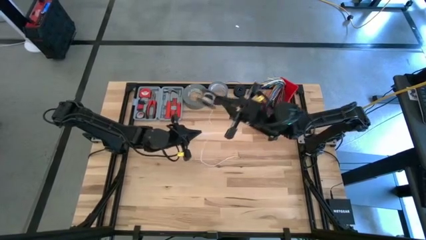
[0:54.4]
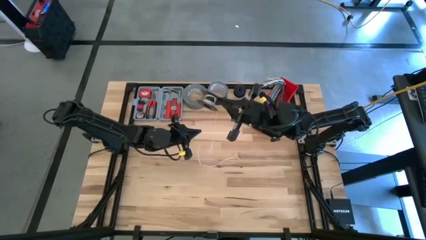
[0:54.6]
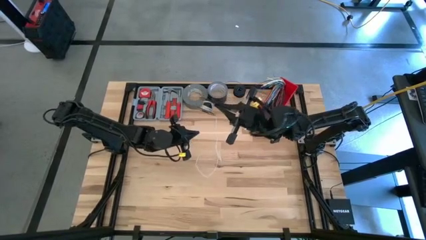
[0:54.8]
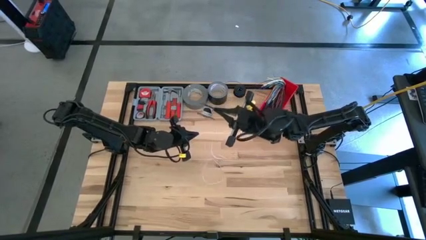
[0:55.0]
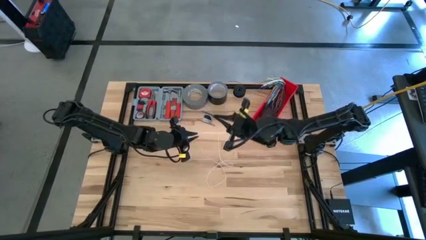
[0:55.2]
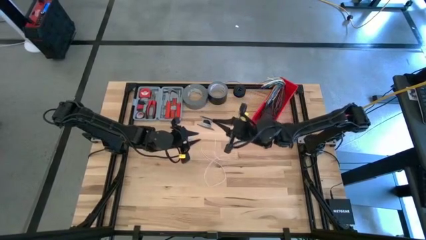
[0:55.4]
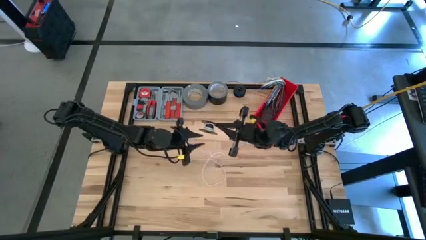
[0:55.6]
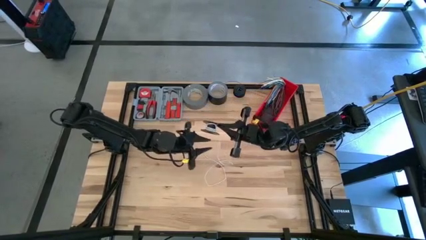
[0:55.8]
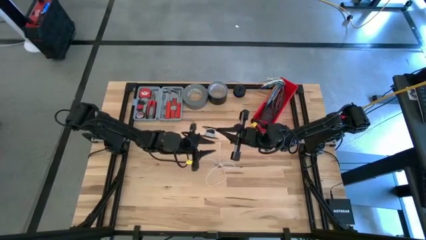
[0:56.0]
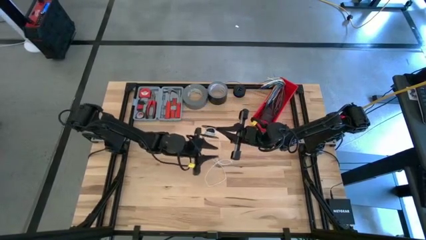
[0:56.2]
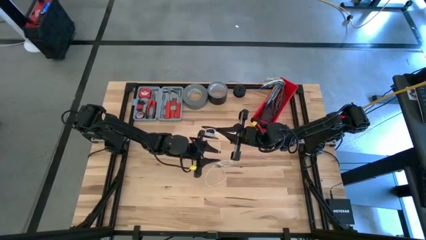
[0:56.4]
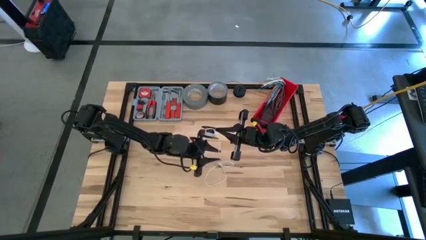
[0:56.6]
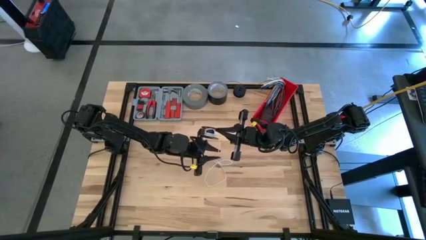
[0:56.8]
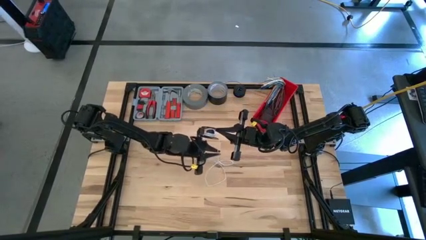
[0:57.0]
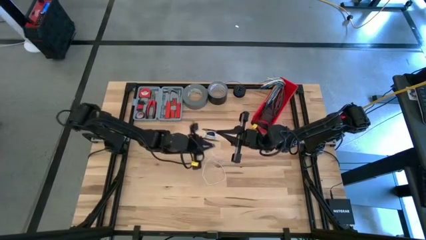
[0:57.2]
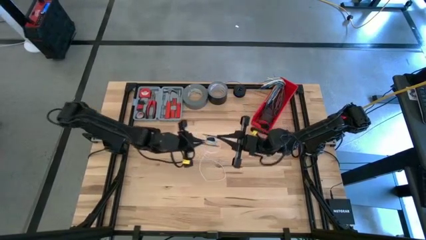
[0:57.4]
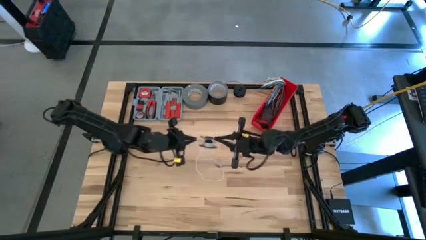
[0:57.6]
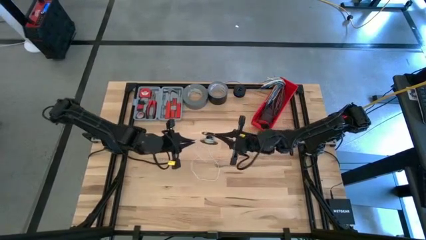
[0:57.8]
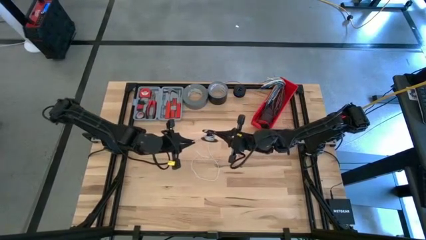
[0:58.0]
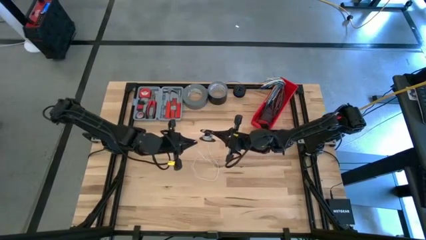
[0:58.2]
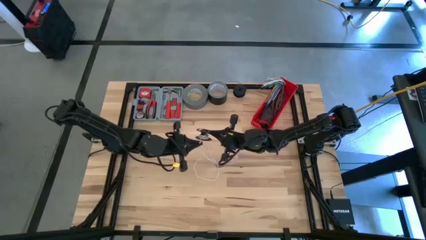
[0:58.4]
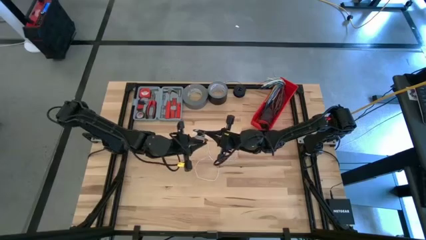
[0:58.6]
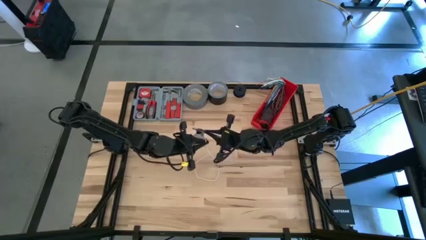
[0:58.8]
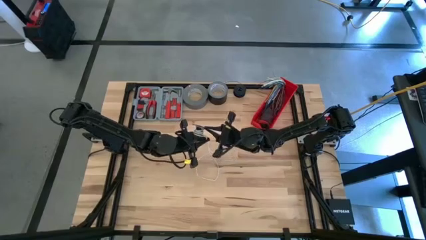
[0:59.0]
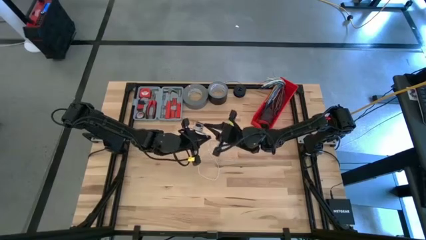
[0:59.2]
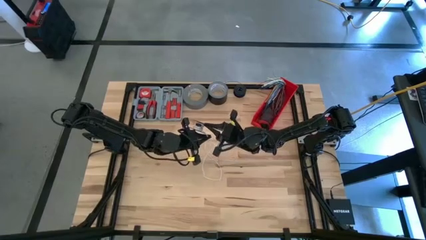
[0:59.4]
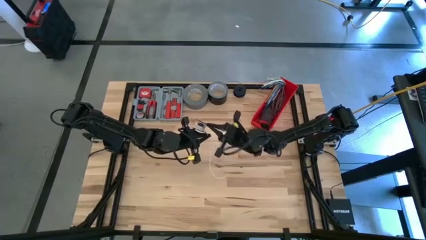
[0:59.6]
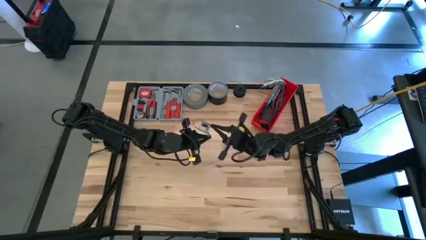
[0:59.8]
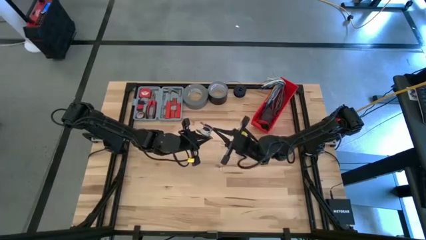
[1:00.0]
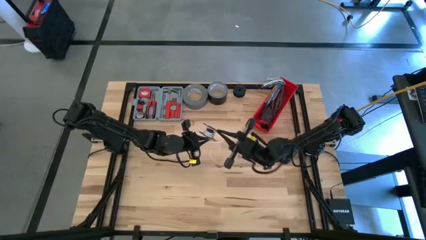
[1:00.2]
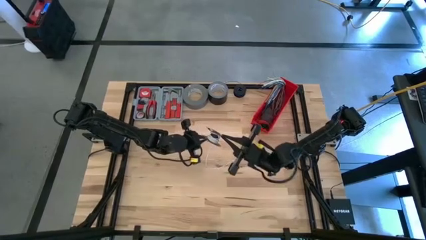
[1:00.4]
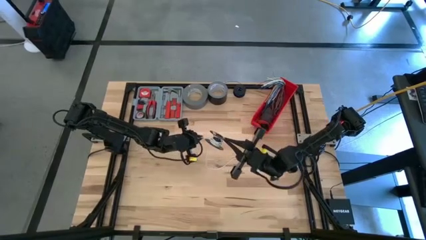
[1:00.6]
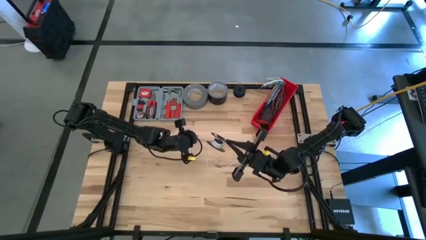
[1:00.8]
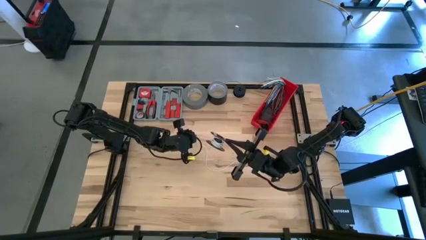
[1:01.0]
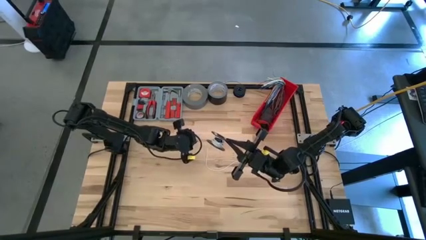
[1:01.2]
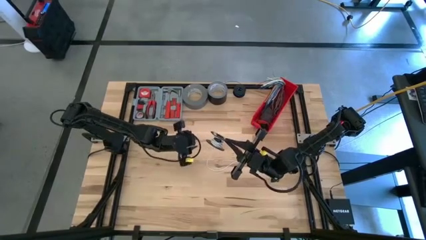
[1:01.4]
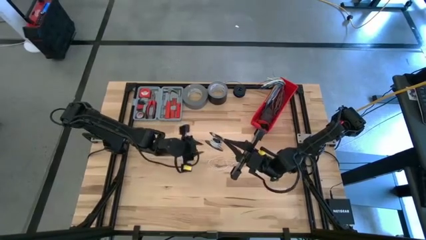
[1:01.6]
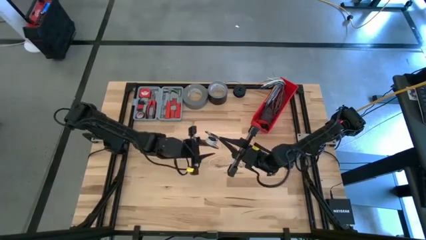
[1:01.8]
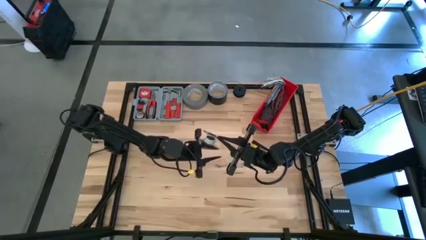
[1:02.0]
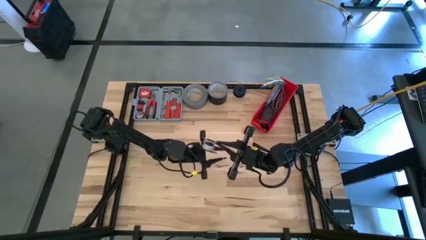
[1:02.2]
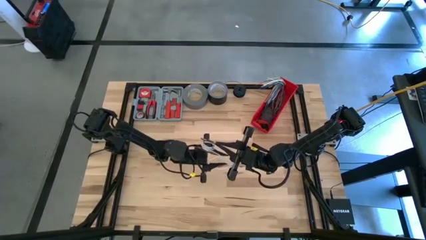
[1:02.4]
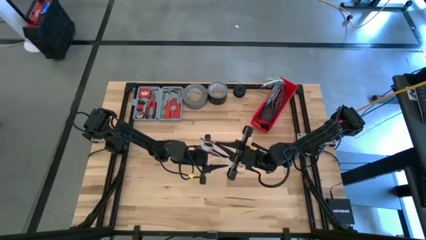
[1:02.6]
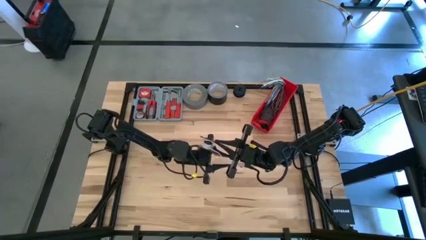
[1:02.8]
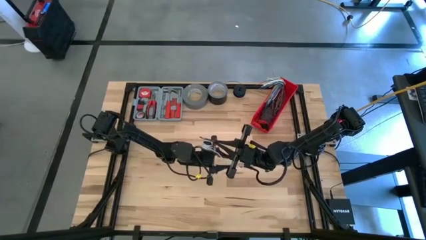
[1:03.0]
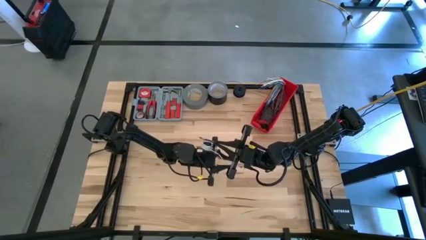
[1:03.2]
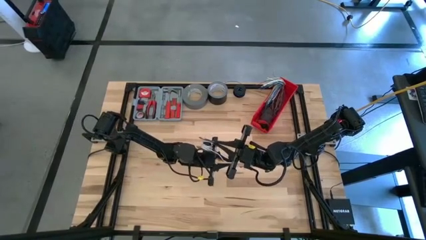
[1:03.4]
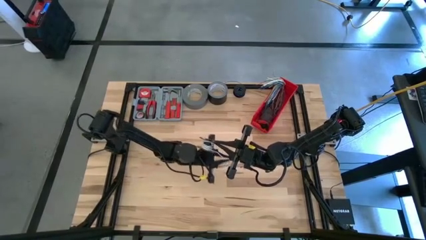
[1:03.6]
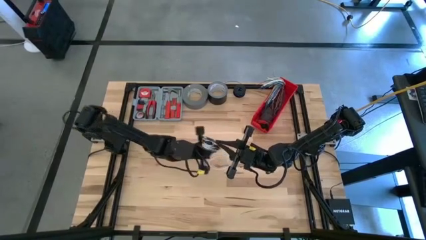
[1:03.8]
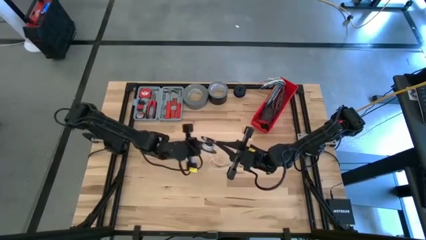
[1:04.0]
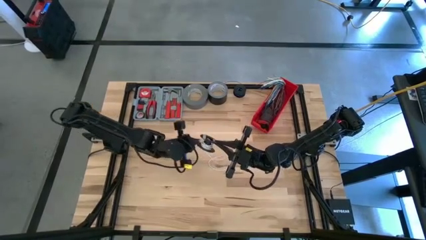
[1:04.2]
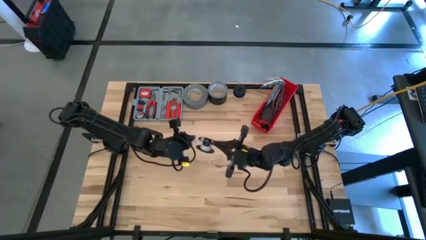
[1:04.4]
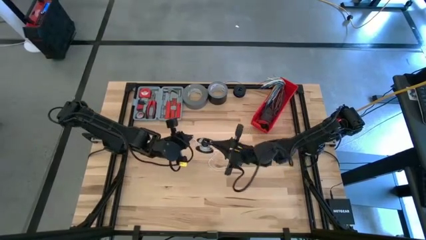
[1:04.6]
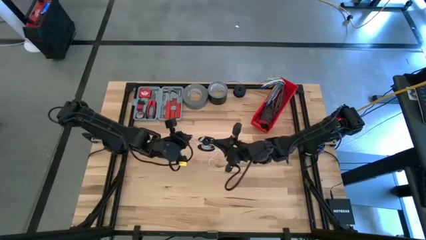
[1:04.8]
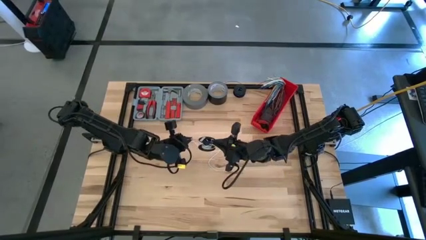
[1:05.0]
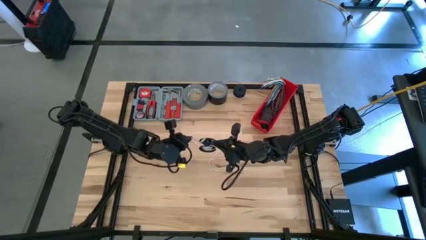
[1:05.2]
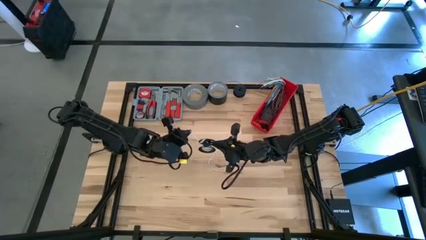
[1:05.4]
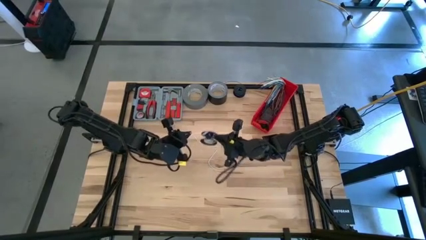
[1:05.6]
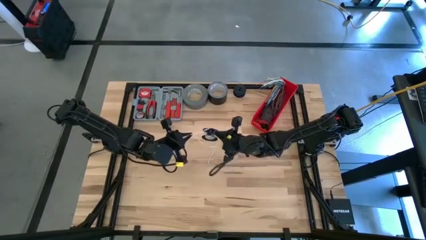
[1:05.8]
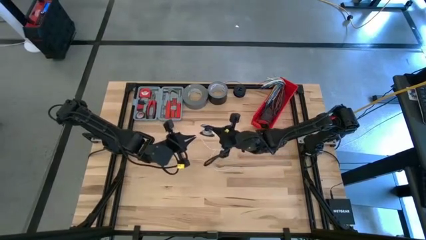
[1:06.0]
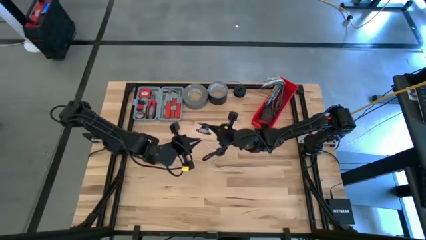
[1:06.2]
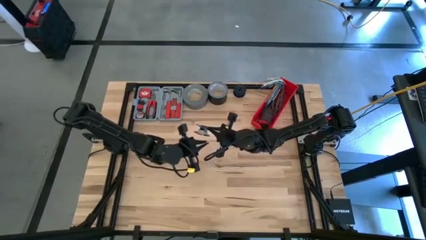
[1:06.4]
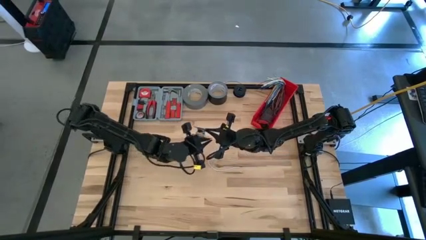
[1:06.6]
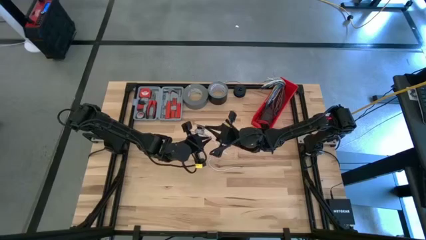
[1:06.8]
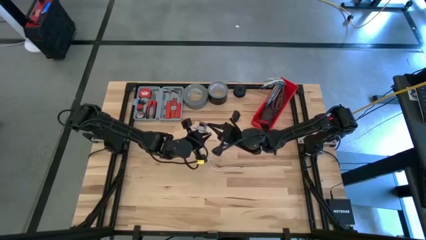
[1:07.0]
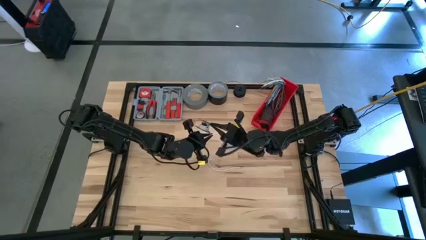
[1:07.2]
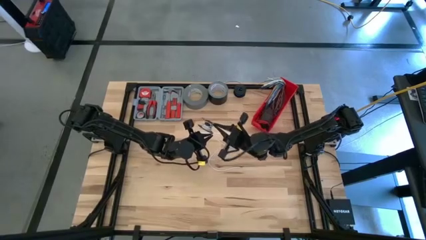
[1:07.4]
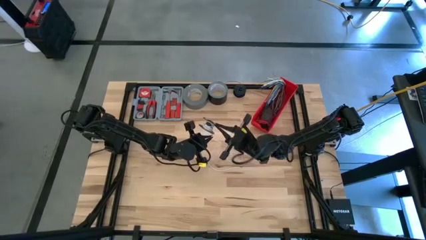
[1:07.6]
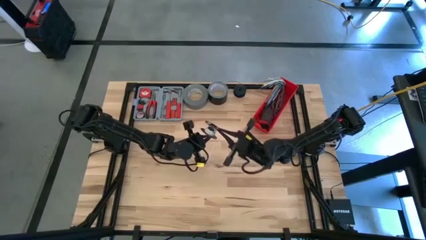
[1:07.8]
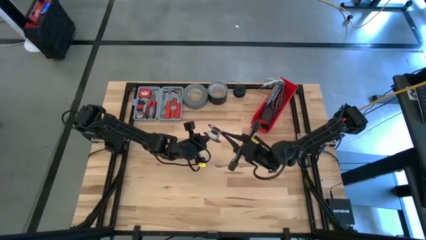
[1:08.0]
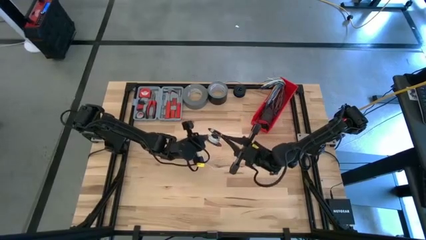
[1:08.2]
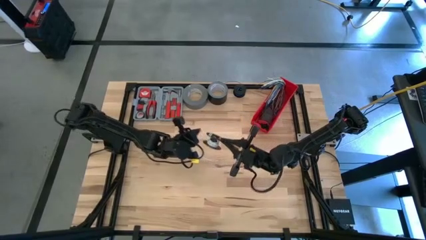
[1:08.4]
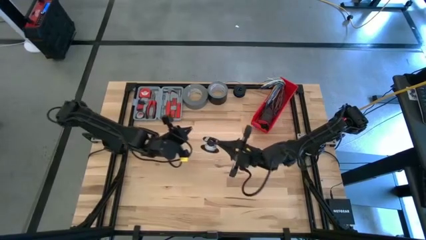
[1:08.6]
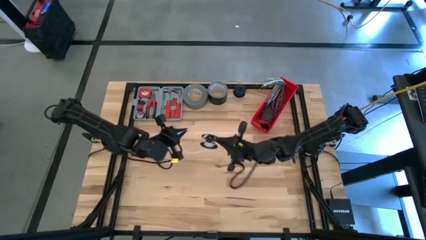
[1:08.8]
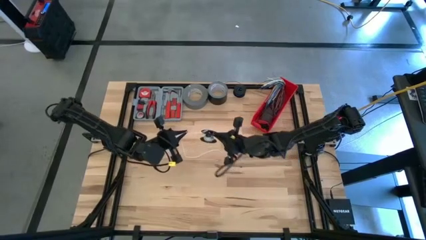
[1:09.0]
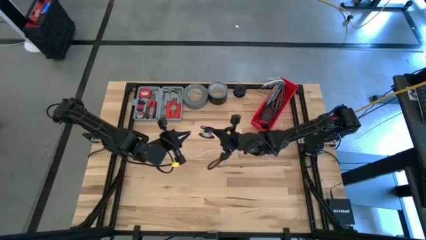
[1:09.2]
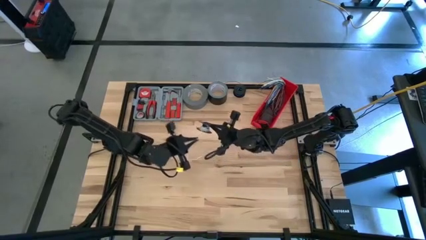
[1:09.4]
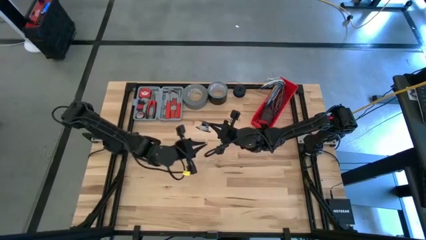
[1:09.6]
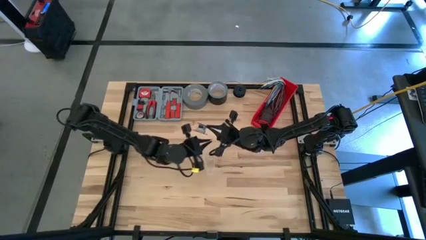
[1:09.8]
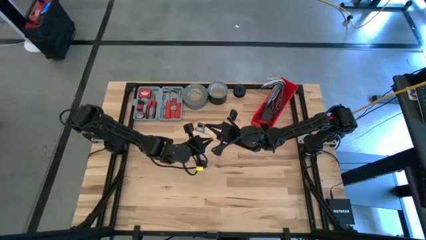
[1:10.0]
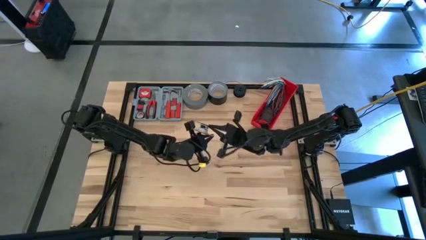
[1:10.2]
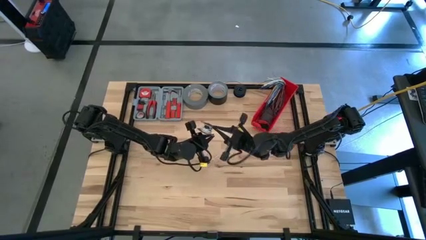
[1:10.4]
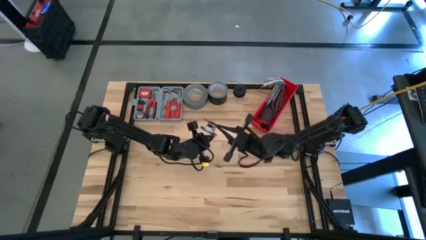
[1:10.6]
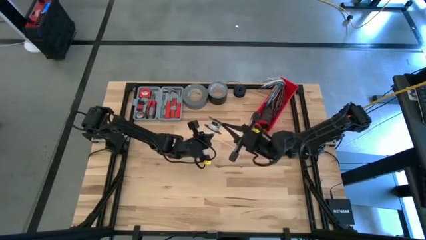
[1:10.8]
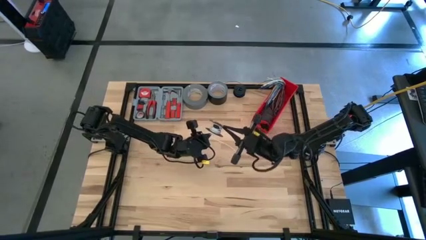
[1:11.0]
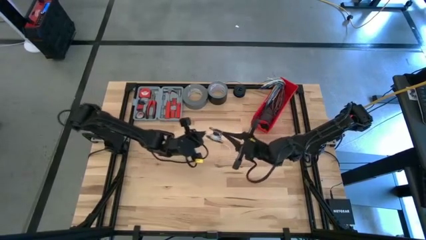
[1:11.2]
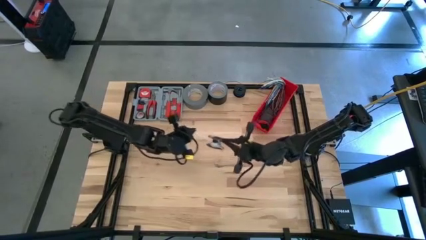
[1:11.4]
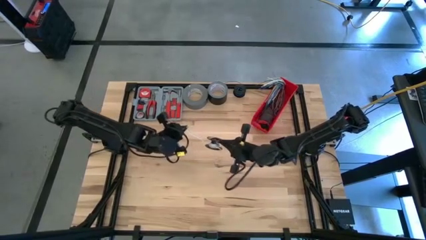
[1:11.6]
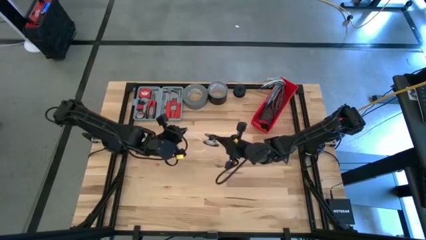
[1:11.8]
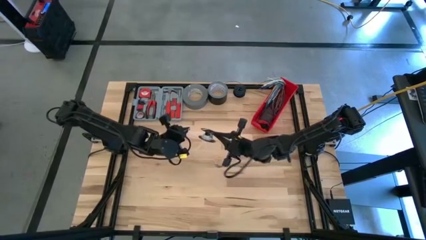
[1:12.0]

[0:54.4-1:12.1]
Task: Coil cords
Coil the white wire onto the spool

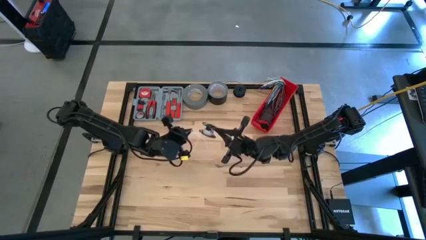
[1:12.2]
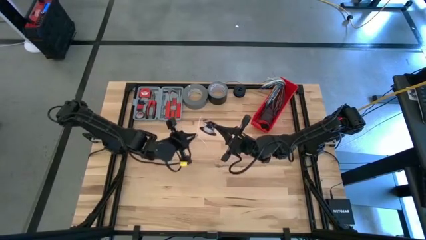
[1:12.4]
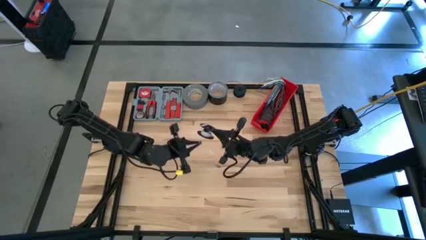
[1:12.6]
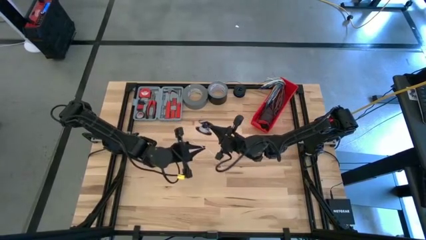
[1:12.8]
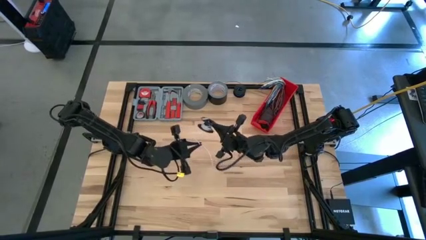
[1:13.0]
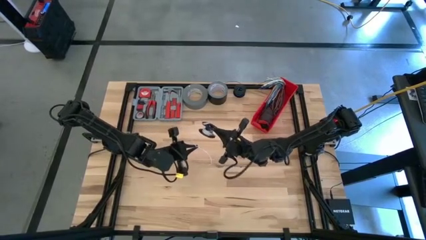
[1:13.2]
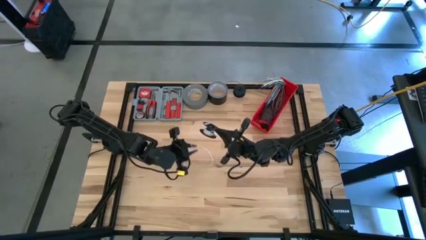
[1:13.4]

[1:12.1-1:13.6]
Coil the white wire onto the spool
